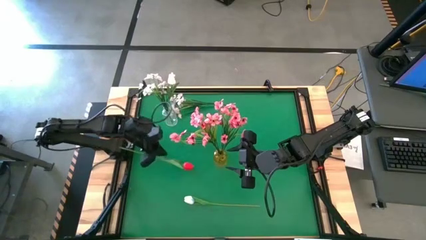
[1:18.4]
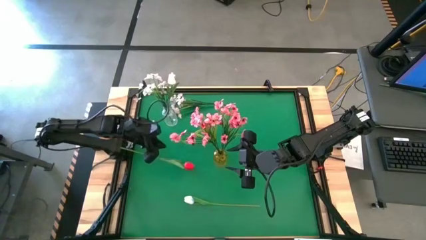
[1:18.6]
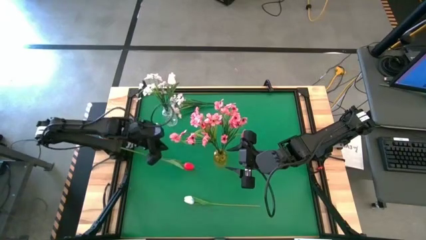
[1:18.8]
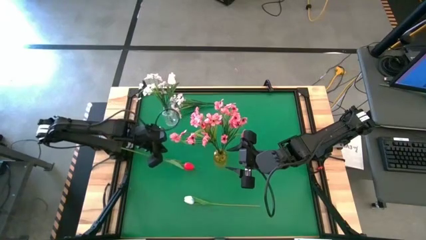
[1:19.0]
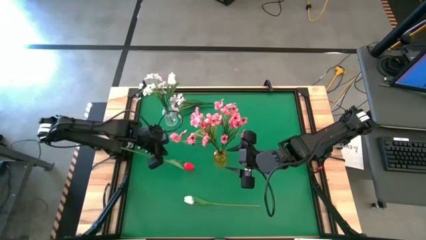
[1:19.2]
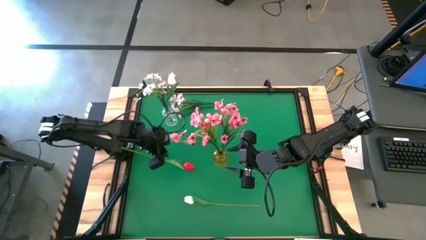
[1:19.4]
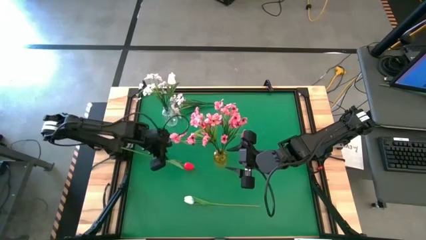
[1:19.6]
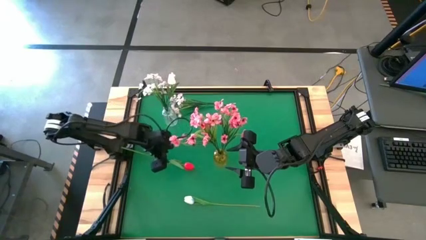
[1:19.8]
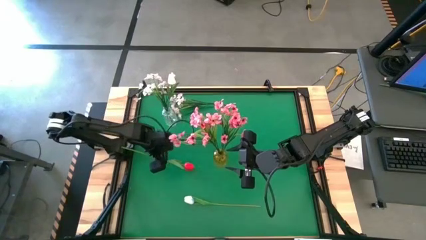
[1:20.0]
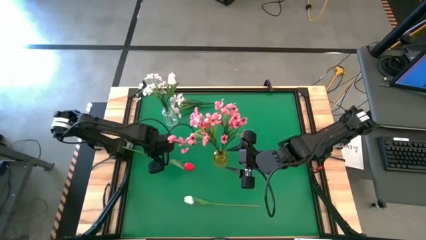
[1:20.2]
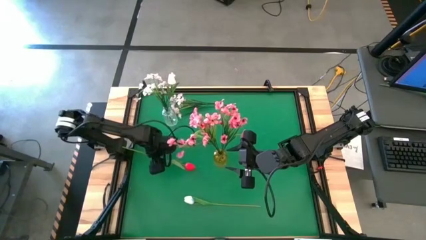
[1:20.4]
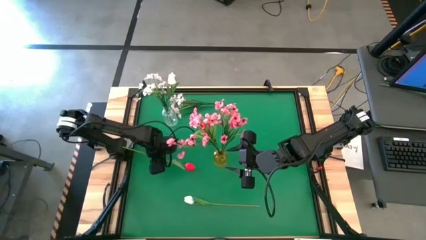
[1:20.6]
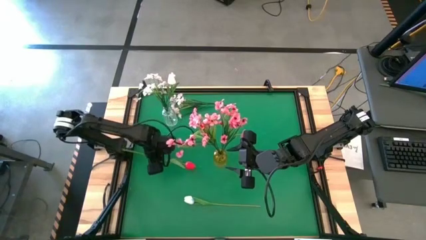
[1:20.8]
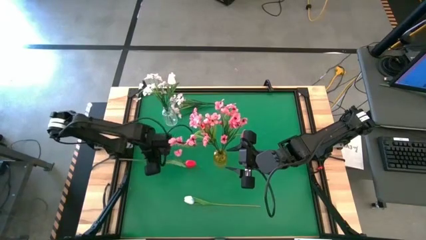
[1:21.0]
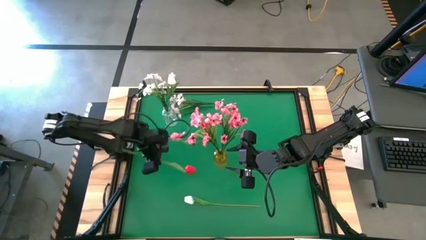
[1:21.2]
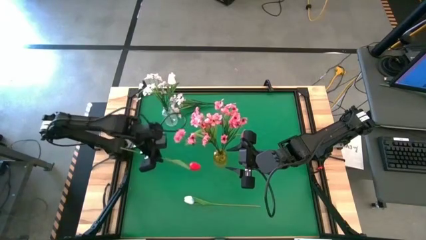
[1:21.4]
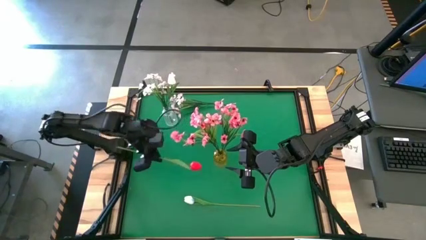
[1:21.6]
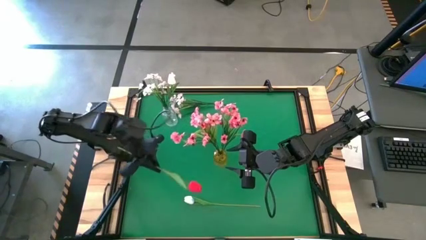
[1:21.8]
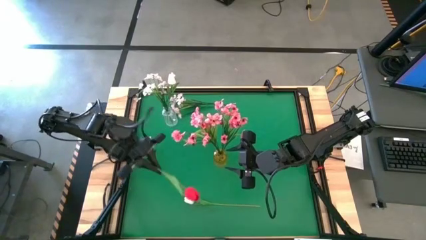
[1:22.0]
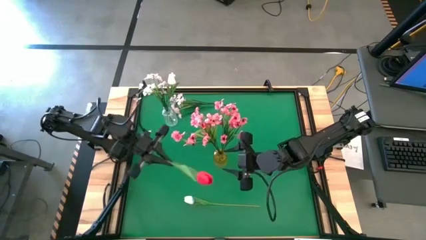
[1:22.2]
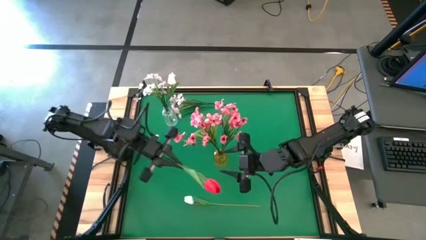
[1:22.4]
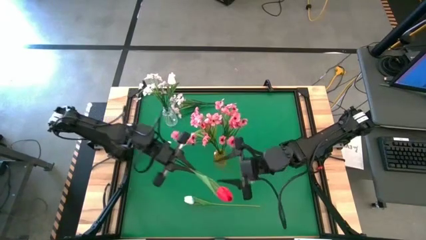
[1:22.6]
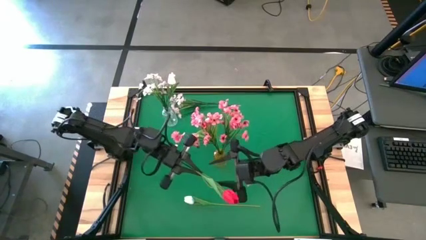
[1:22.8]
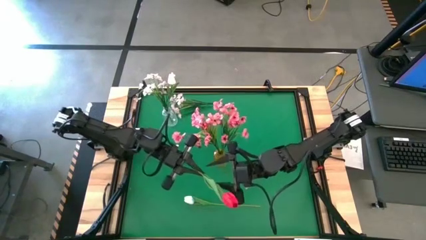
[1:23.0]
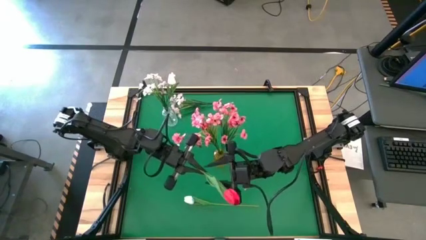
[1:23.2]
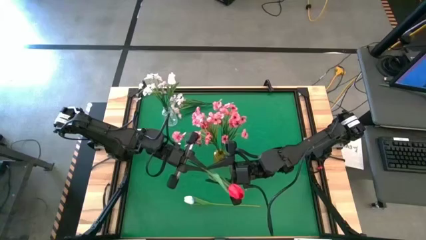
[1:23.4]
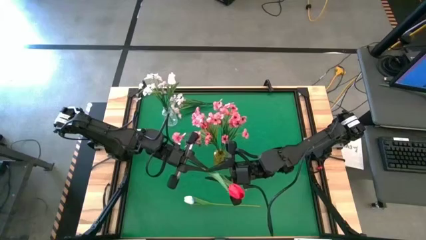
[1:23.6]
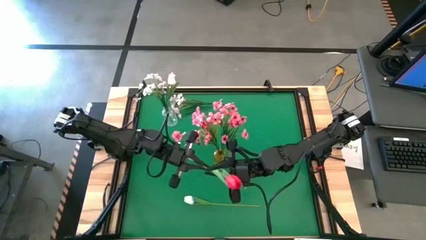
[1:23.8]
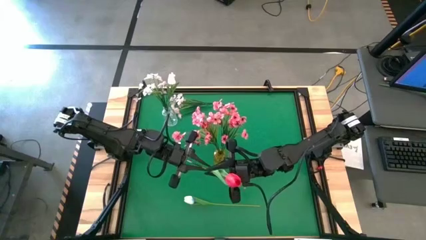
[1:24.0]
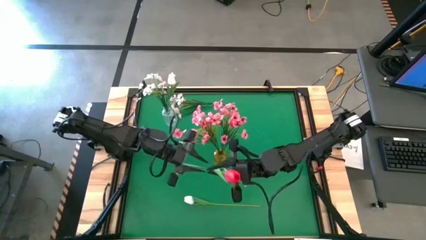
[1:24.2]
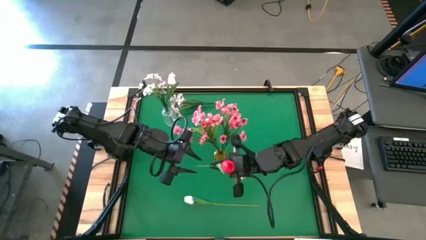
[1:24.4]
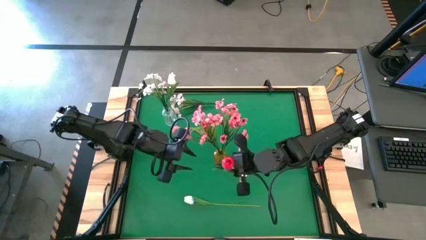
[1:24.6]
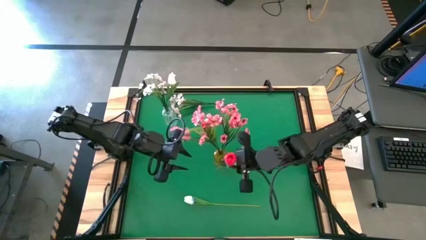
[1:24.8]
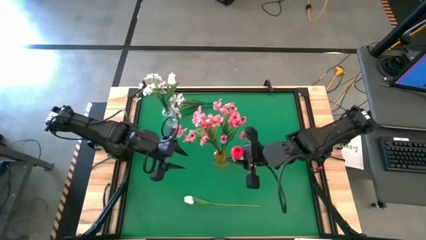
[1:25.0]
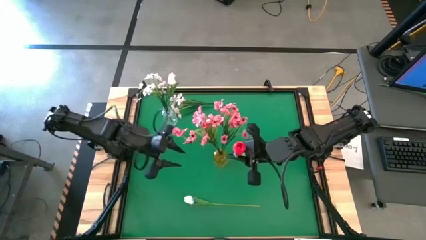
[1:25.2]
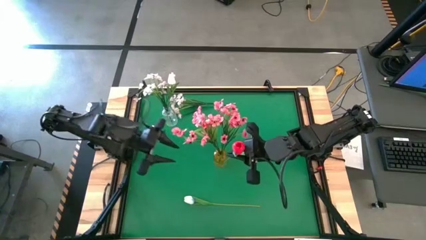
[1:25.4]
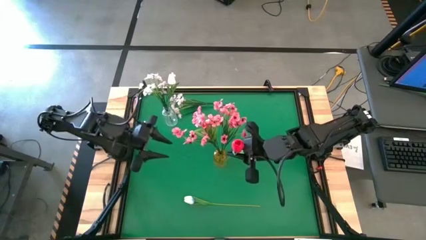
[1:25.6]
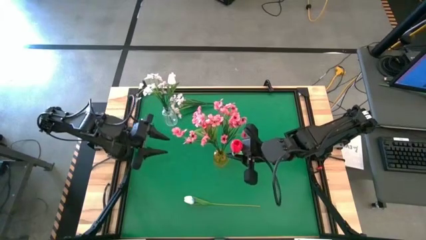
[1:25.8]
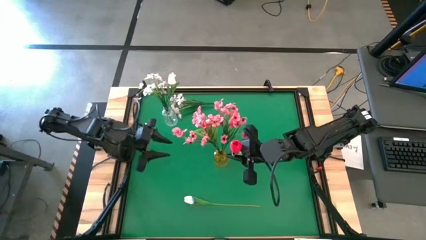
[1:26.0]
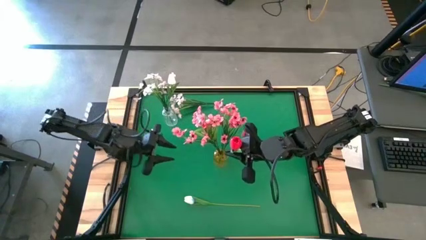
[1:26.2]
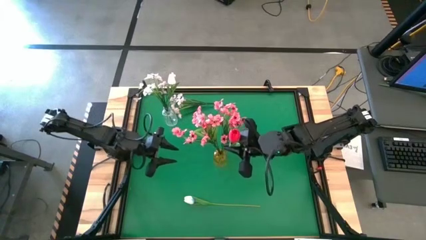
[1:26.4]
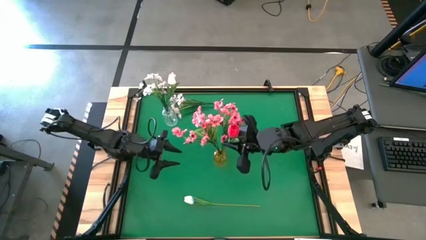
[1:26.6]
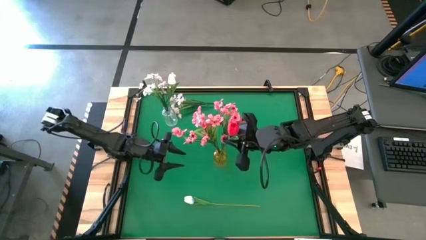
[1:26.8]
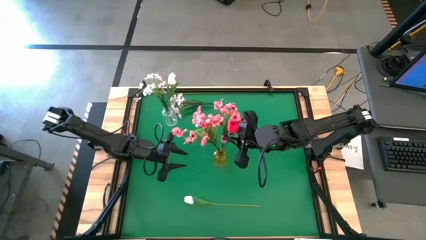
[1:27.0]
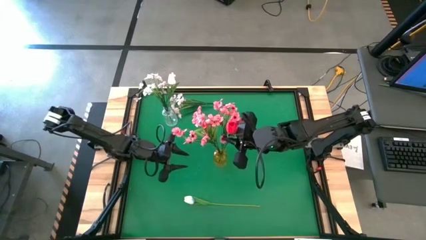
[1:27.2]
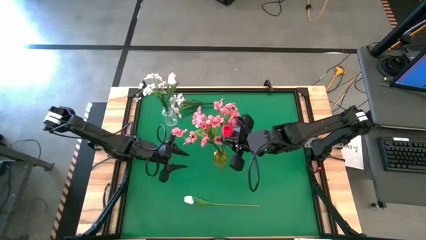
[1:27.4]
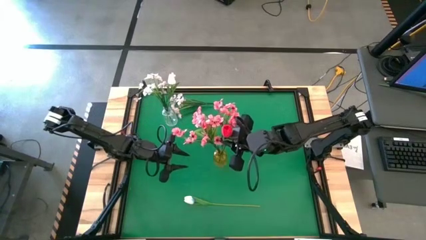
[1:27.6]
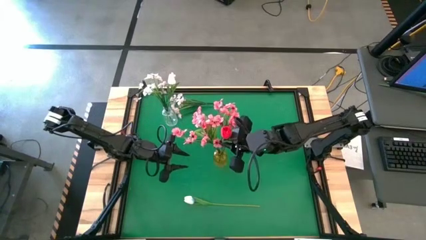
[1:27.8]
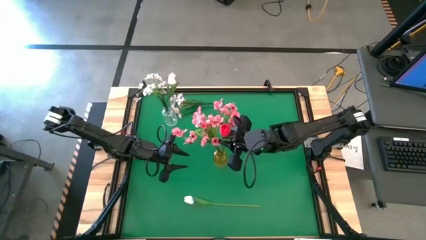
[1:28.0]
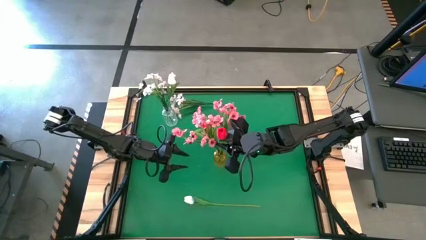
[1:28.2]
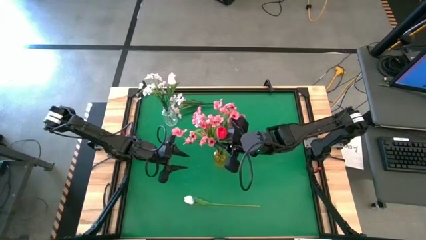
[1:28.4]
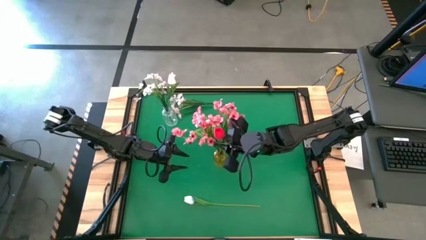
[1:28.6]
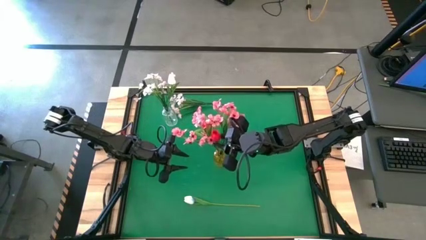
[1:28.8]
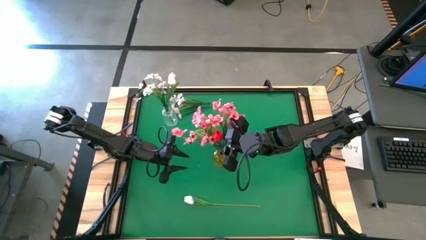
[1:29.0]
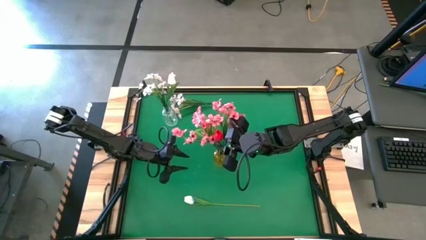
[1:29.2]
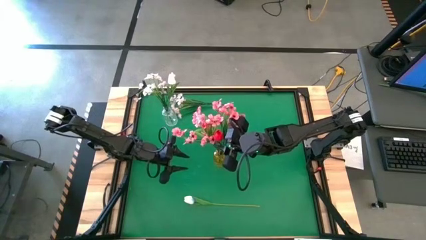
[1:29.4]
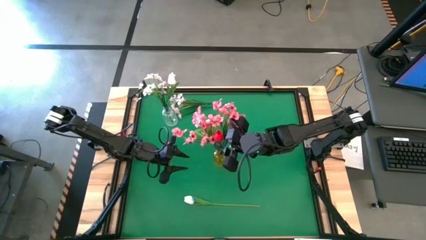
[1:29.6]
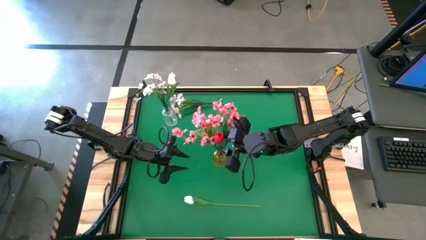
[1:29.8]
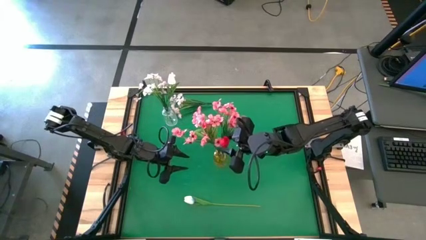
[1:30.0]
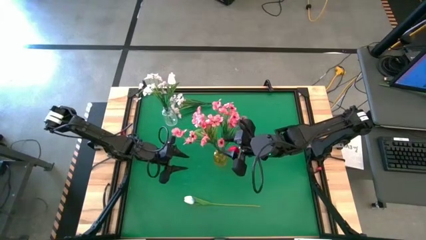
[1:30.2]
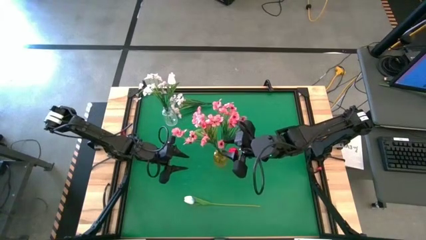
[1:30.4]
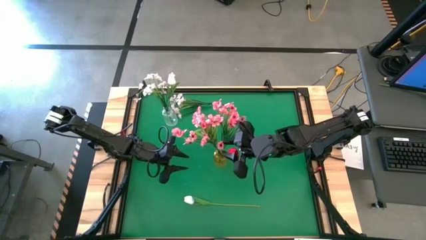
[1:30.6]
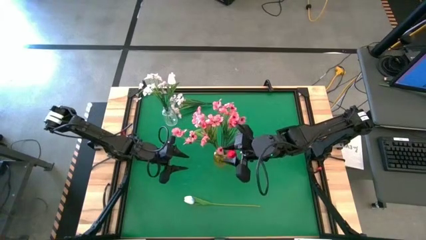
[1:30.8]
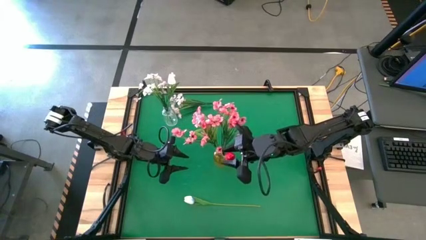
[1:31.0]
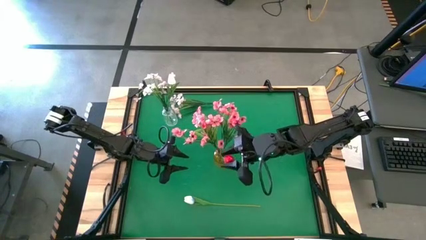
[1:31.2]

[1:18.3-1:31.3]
Task: Sort flowers into vase by color
Put the red tulip into the yellow vase

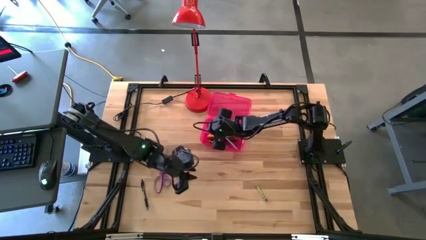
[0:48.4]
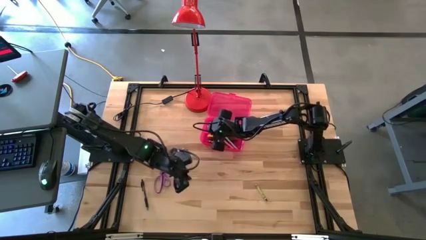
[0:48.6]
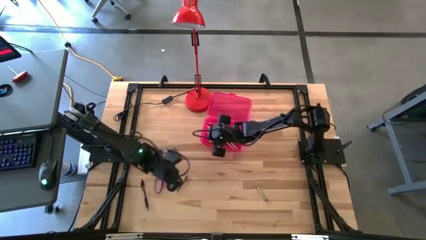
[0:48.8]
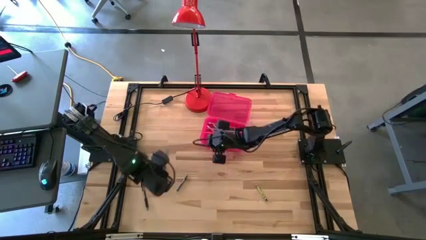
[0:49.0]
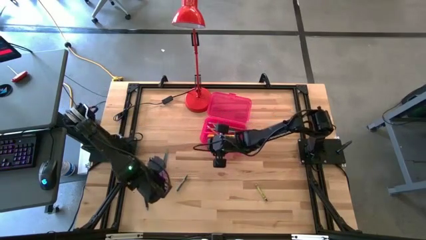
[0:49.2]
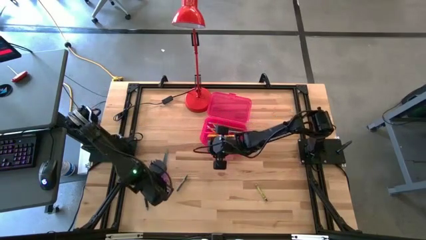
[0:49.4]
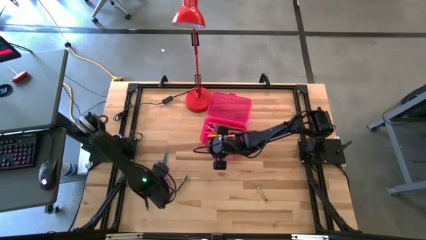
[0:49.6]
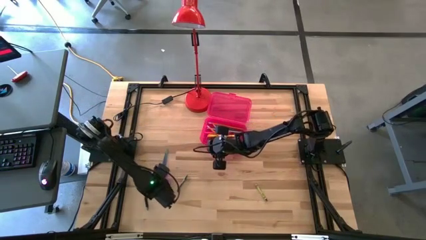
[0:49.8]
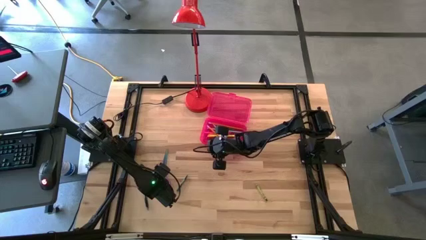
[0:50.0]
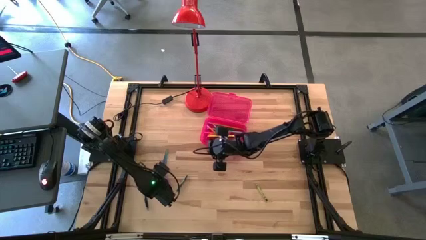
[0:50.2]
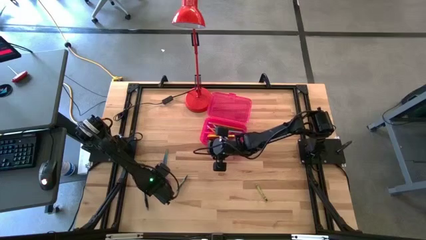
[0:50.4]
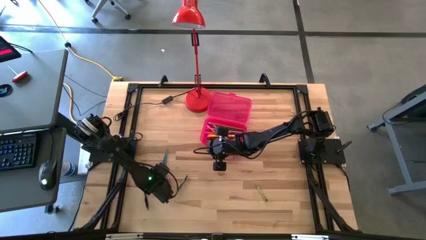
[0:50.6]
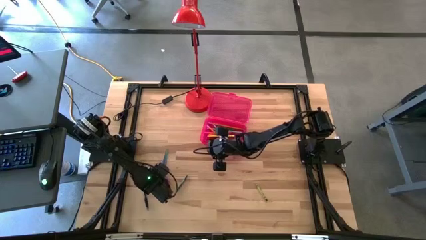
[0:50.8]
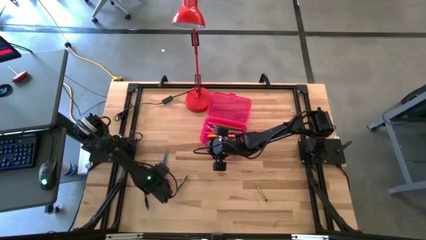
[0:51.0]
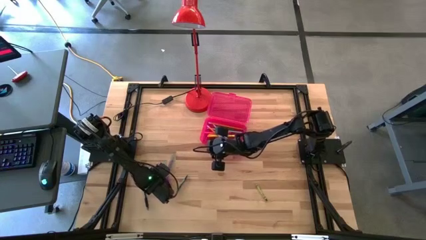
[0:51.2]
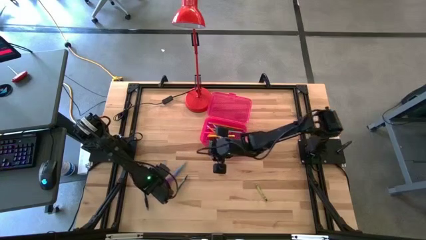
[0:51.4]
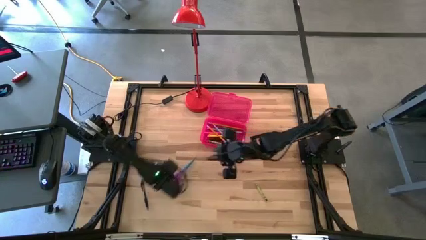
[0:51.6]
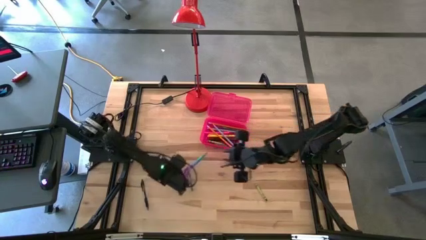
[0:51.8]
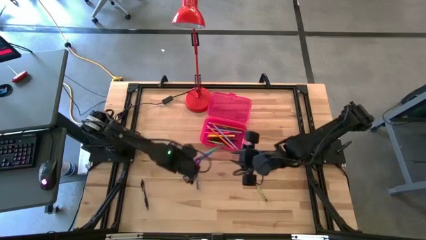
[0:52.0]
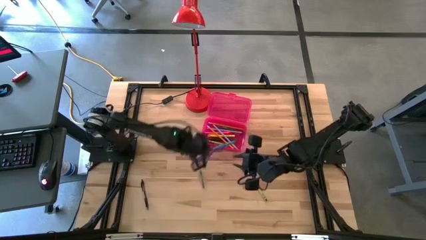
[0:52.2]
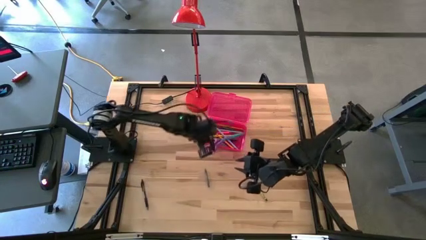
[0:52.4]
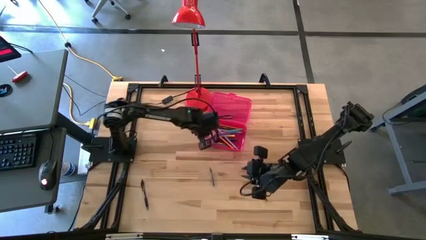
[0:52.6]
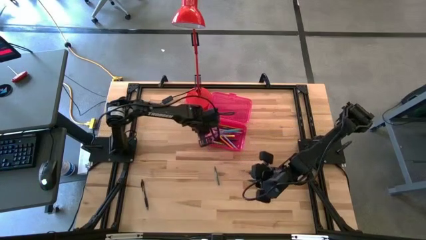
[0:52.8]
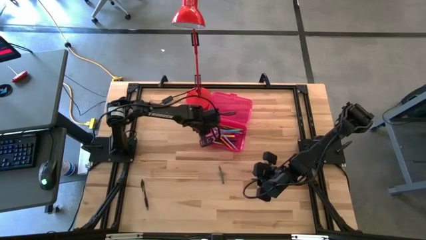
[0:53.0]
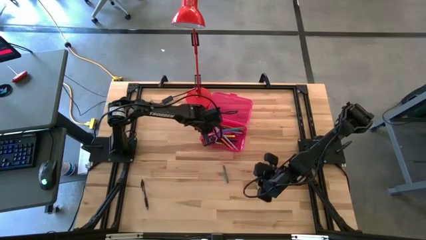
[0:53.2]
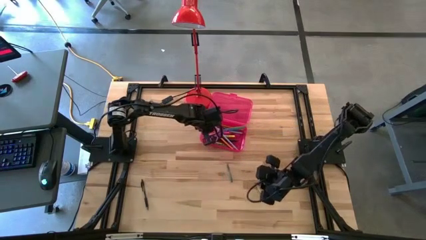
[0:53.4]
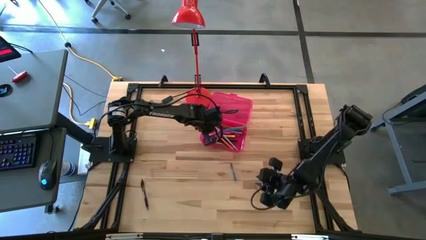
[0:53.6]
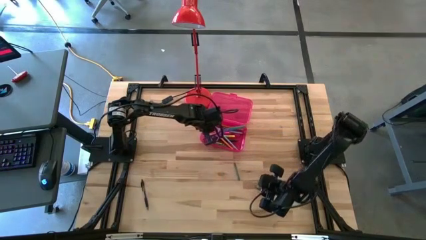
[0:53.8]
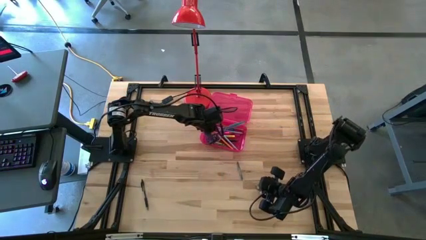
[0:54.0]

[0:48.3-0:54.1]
Task: Pick & place school supplies into a supply box
Put the purple scissors into the pink supply box
